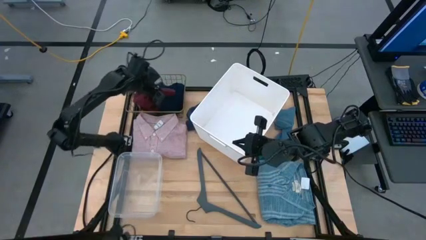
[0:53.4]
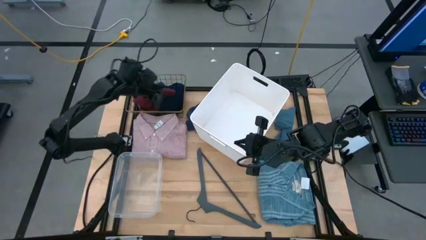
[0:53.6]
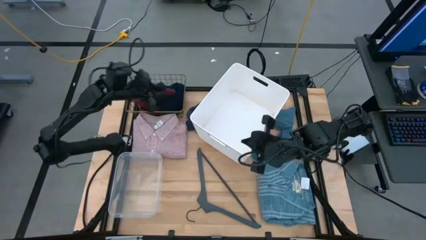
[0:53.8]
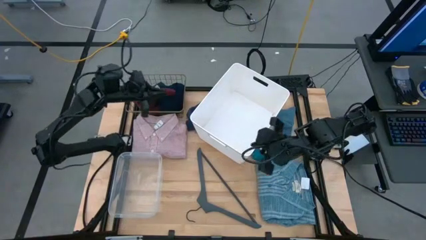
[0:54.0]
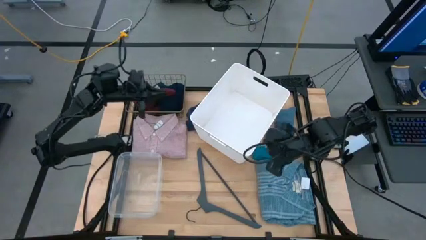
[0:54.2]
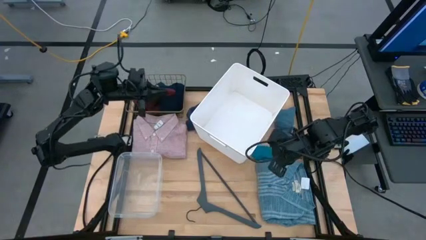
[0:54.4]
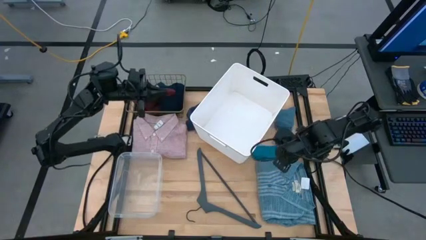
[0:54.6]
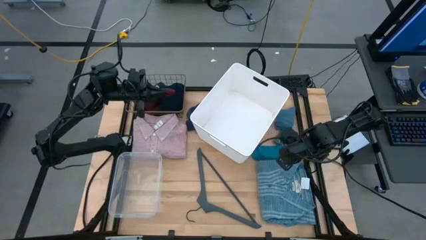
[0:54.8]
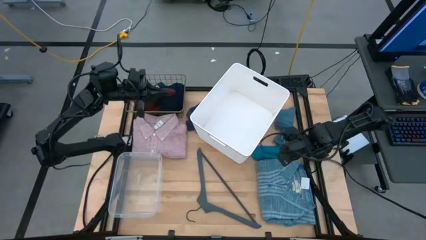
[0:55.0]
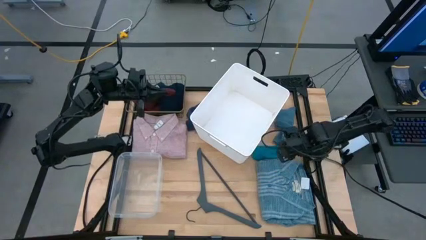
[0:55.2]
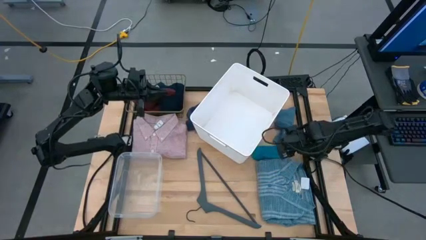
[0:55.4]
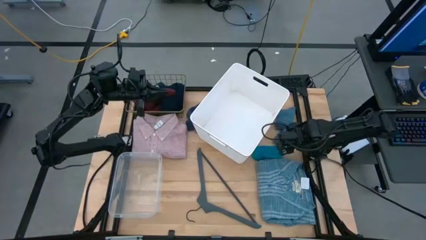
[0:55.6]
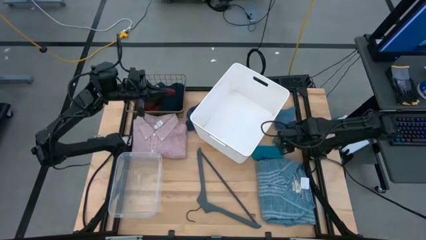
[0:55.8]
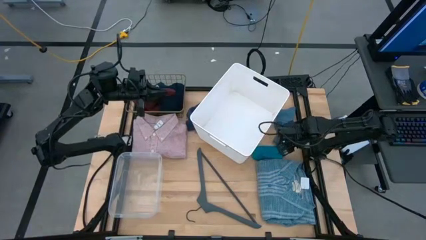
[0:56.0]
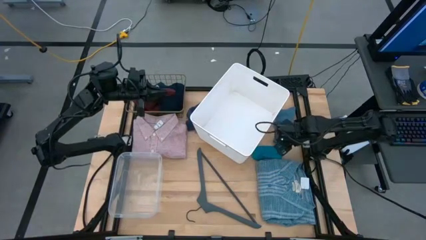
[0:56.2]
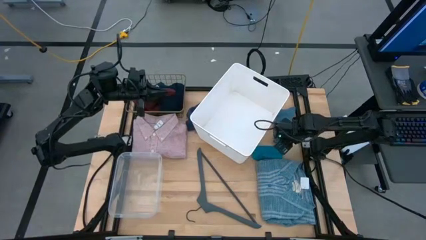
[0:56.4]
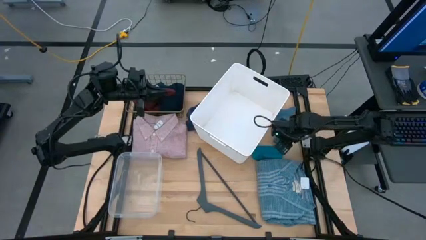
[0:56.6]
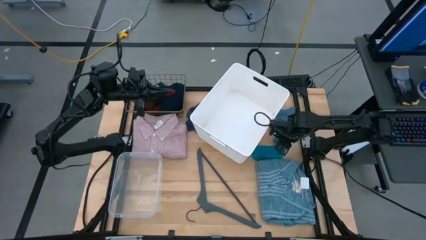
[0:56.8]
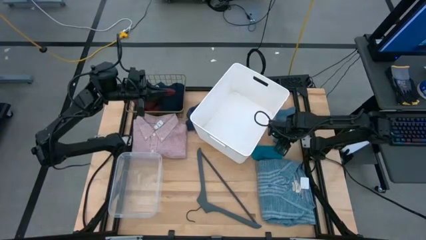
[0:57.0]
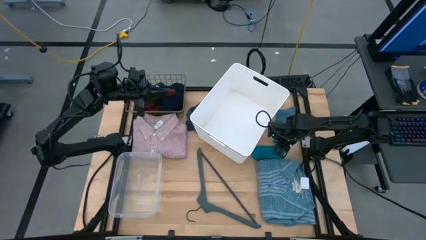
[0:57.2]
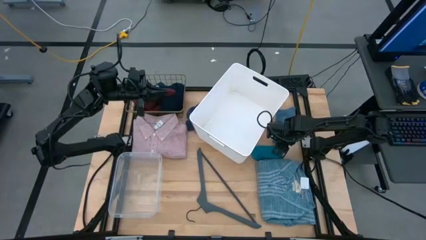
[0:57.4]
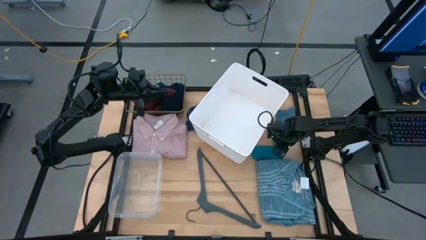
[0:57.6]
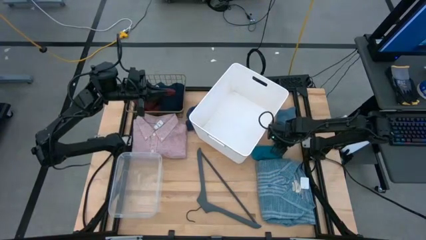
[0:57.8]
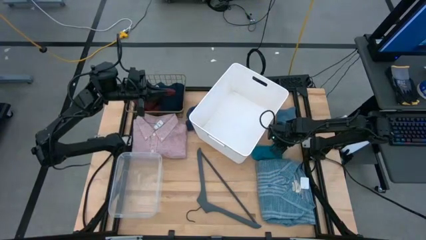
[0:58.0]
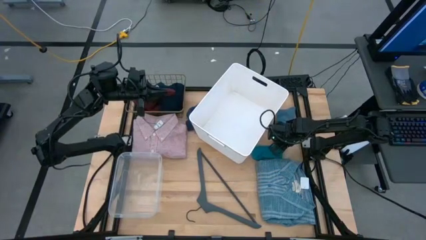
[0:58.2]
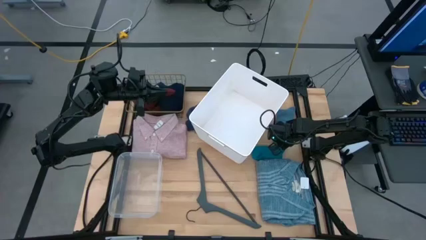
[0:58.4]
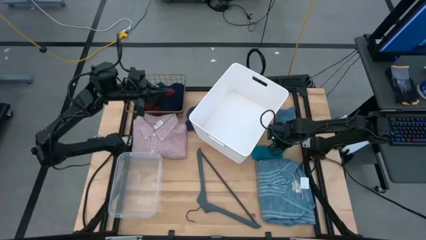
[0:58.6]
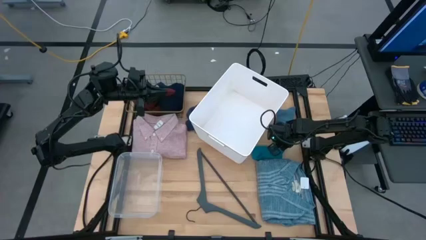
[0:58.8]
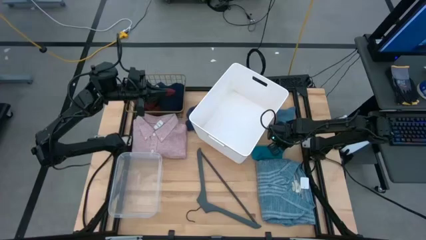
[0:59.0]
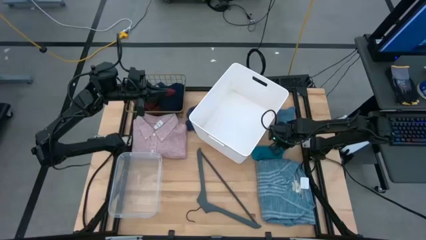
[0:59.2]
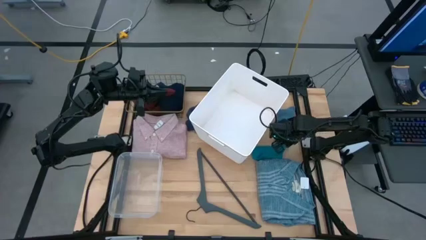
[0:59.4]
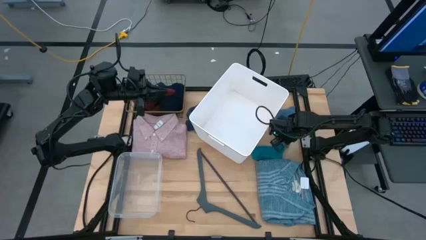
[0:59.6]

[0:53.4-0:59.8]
Task: Pick & Place Cloths
Put the blue sock into the transparent bin

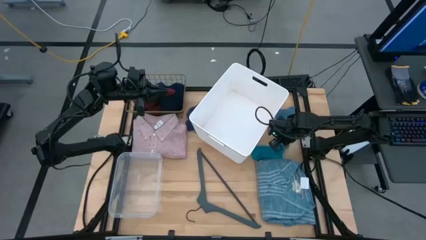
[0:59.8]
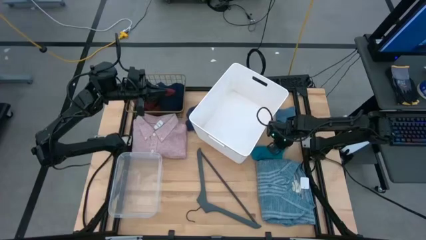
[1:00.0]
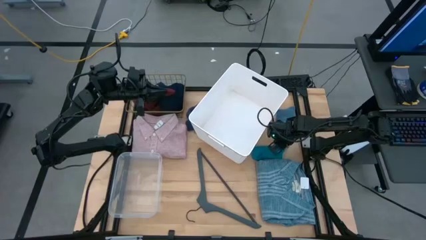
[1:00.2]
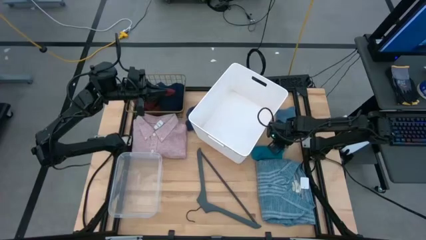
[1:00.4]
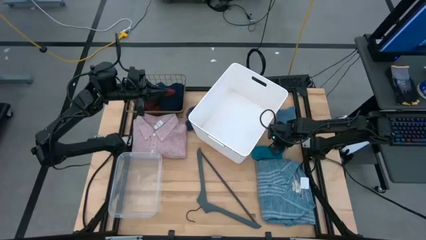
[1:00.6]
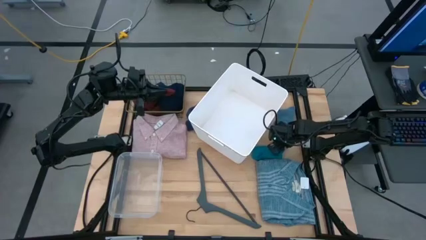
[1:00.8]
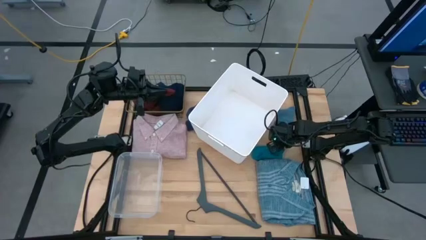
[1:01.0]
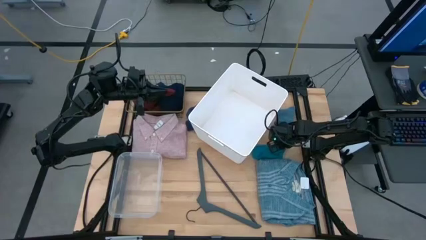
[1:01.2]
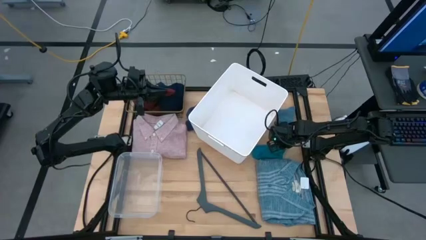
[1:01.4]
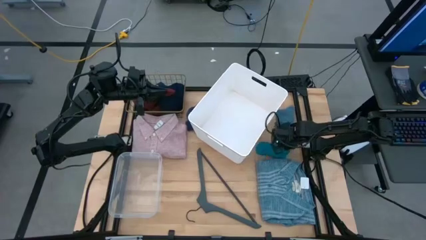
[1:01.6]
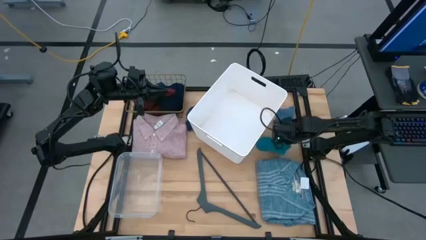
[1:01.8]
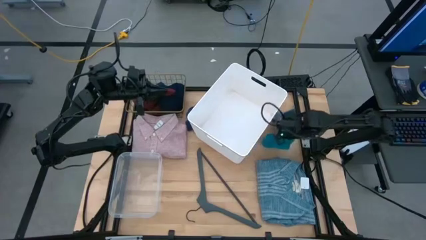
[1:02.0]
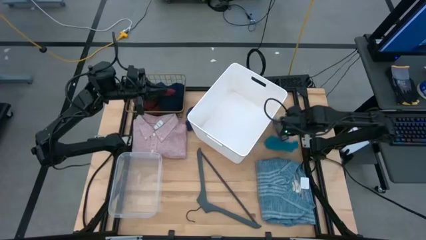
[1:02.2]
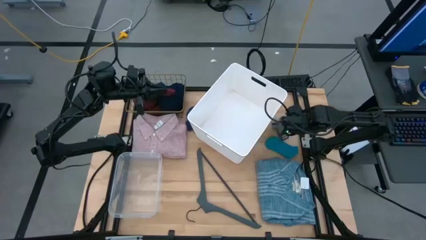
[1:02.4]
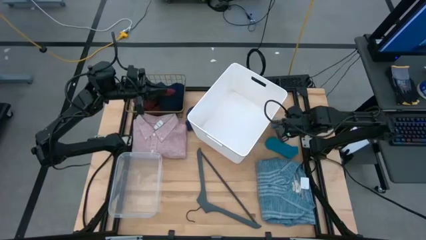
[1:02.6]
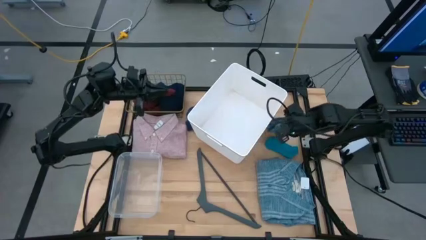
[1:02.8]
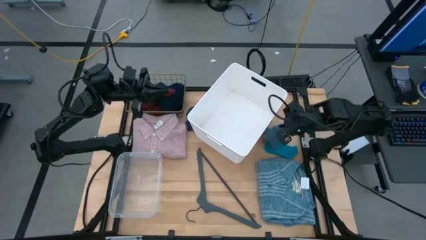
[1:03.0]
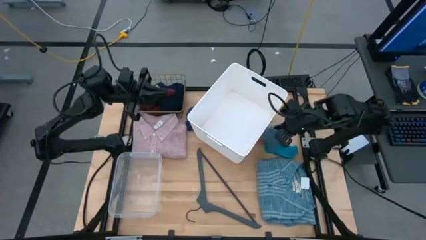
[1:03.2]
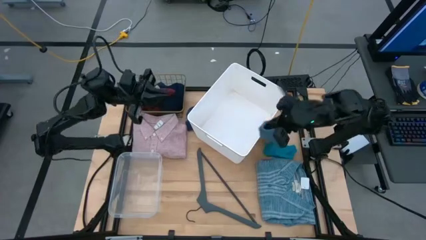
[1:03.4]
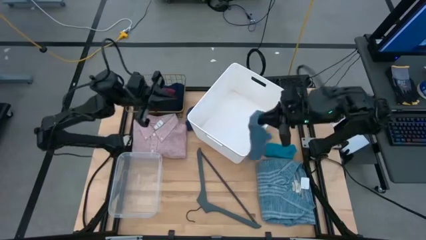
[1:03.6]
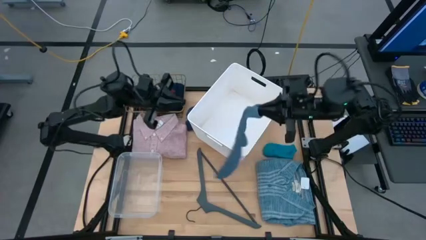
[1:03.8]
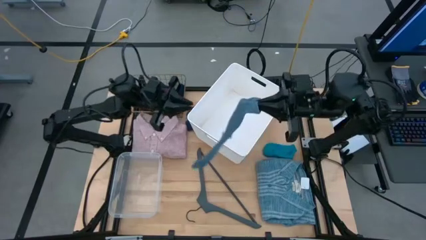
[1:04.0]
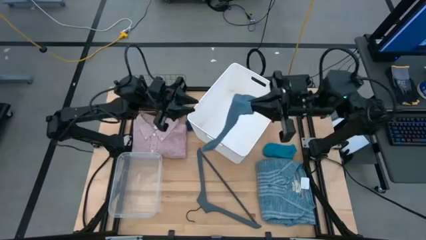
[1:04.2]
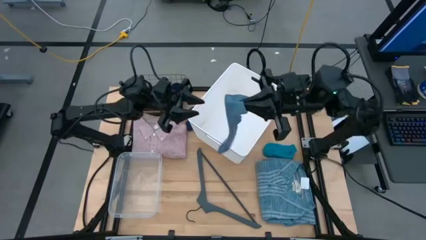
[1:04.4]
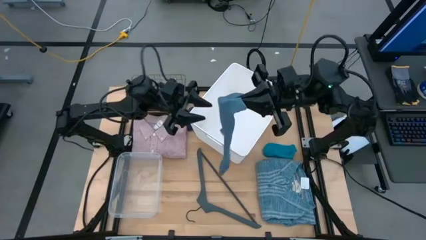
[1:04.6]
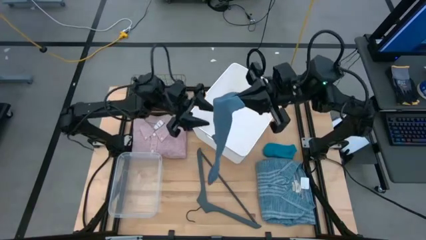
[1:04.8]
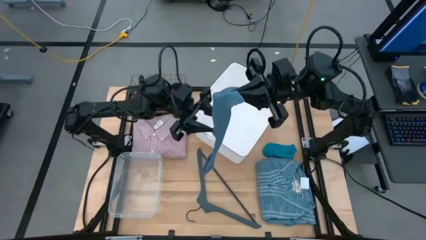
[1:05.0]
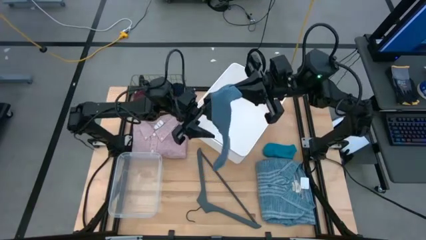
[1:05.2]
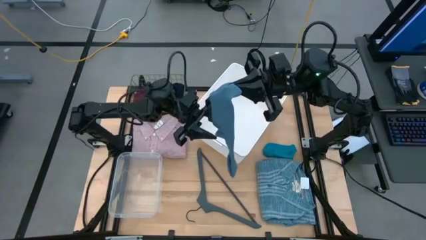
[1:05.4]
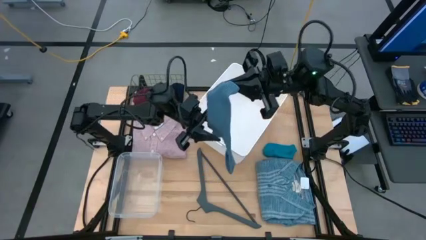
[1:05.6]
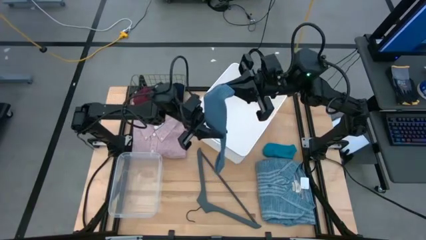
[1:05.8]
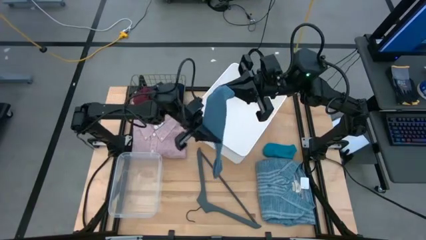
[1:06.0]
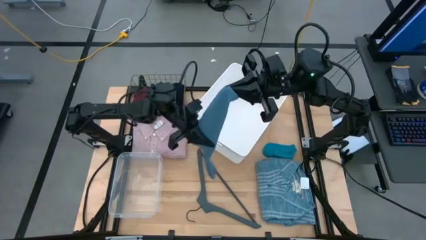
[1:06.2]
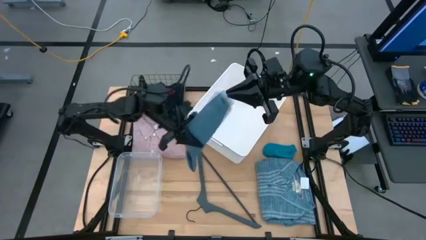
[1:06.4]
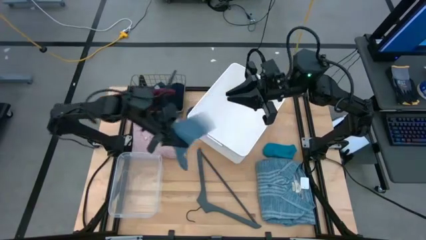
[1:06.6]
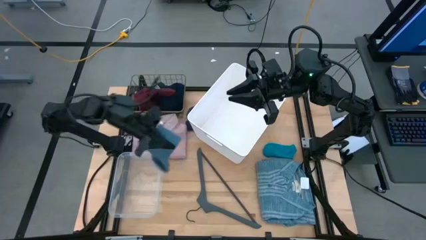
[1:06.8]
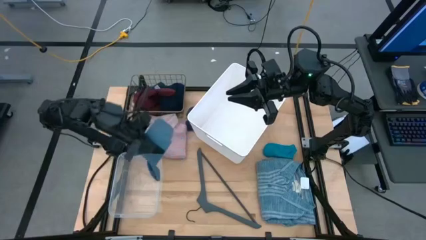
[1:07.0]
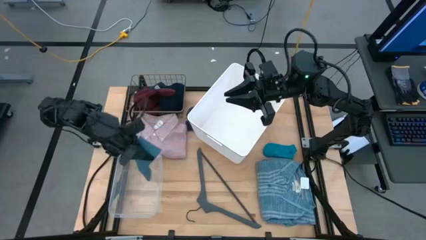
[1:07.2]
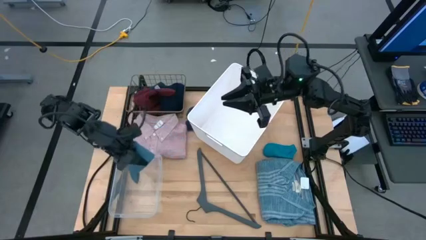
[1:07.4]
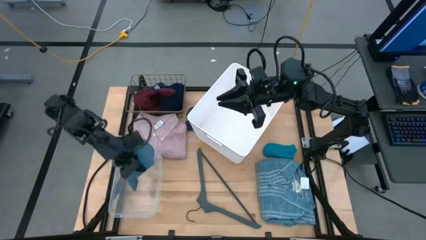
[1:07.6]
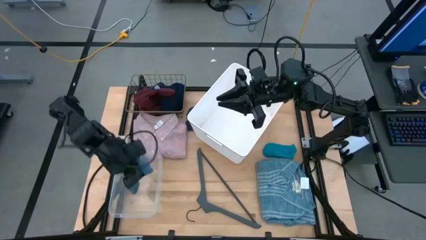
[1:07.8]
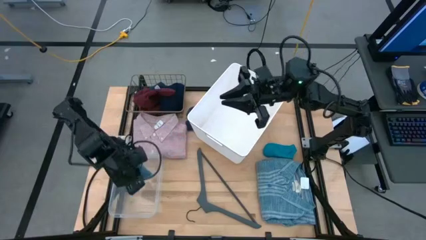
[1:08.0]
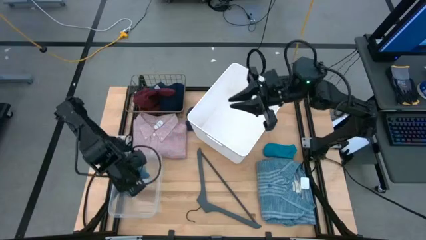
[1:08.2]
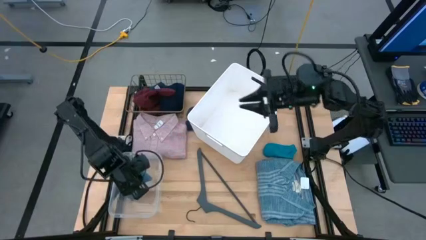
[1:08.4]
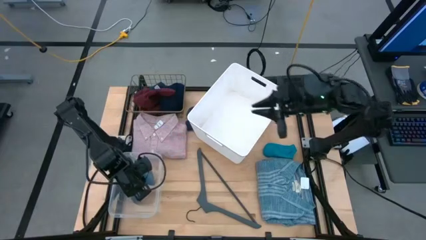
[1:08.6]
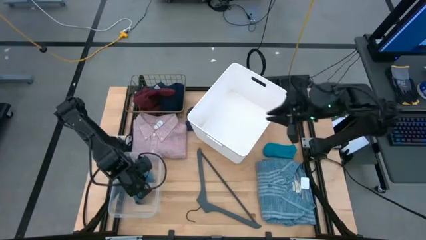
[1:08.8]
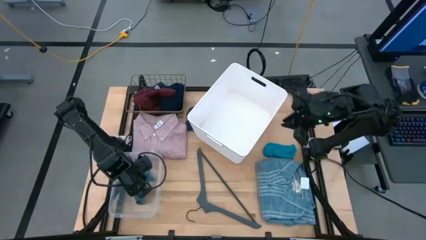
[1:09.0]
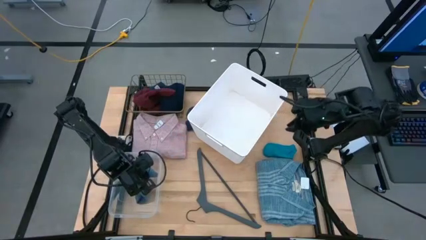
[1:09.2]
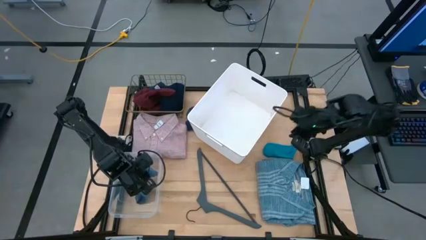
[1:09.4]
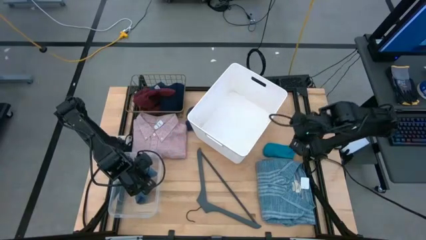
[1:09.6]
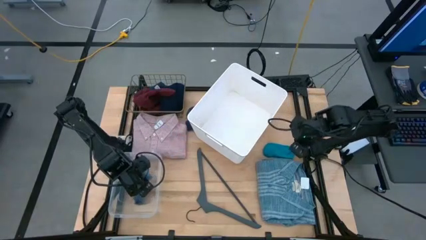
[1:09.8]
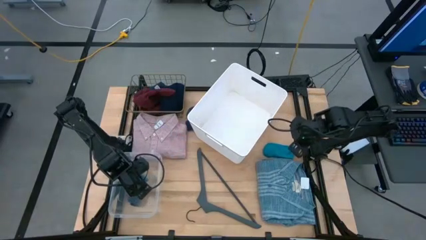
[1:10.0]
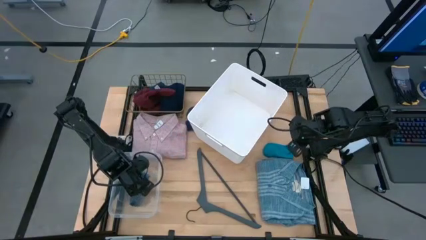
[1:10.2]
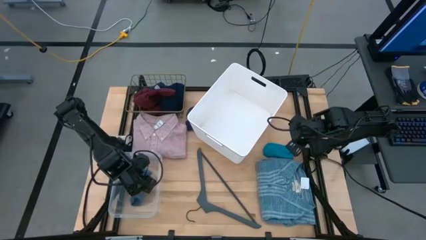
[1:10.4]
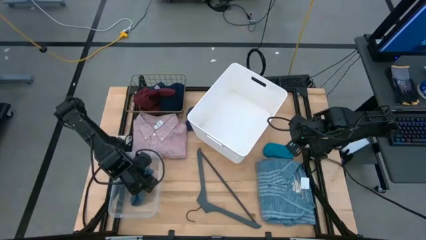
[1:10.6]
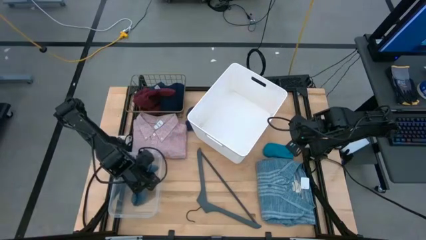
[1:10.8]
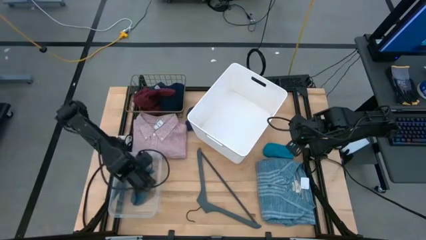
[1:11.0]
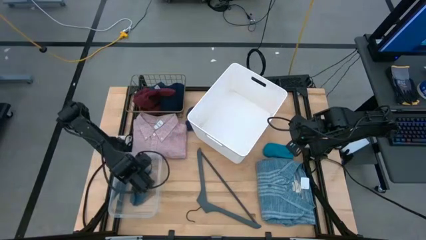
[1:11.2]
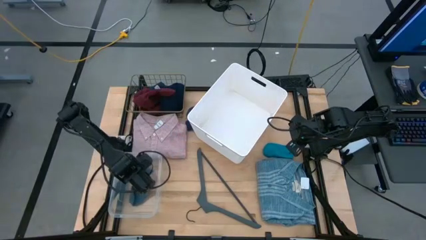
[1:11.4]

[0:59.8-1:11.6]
Put the blue sock into the transparent bin
